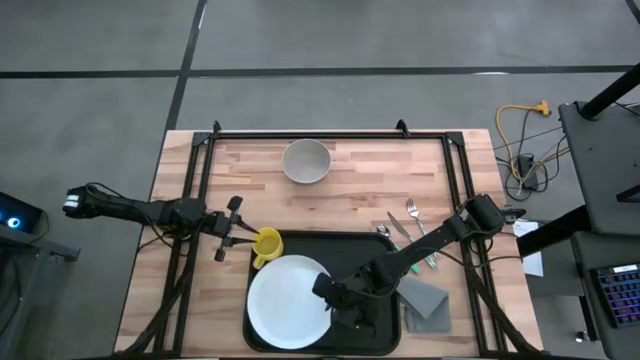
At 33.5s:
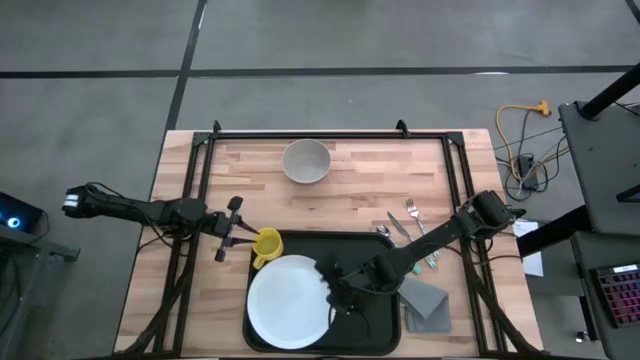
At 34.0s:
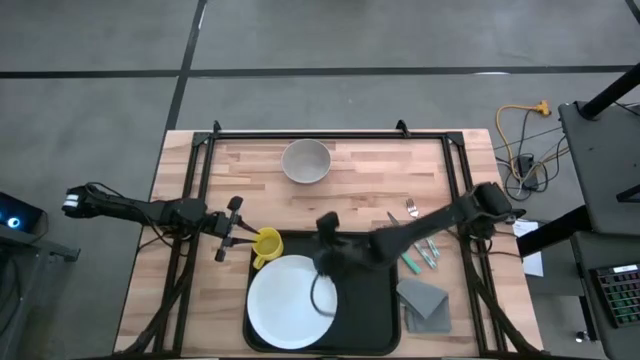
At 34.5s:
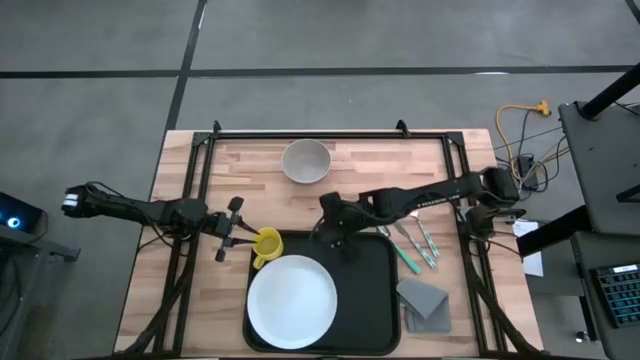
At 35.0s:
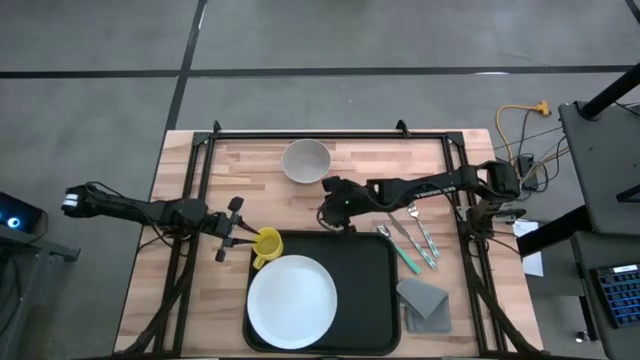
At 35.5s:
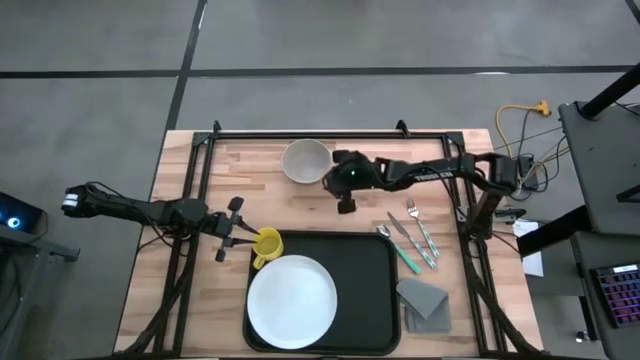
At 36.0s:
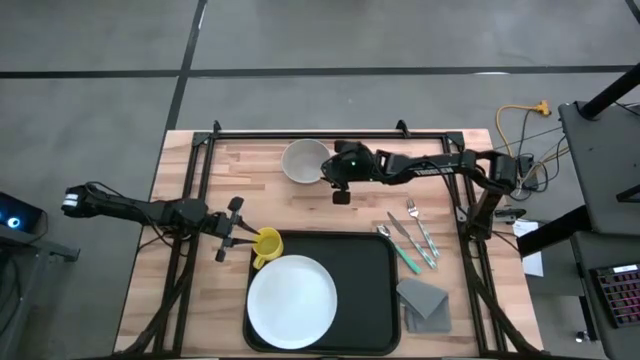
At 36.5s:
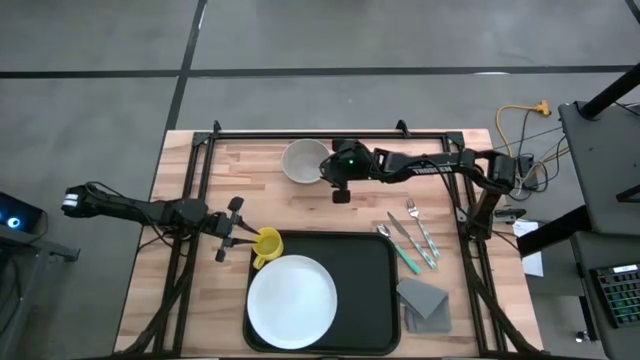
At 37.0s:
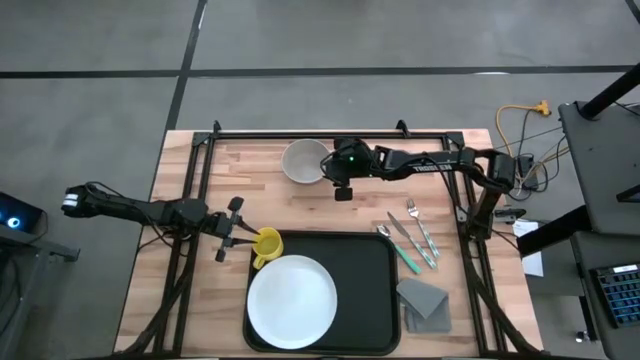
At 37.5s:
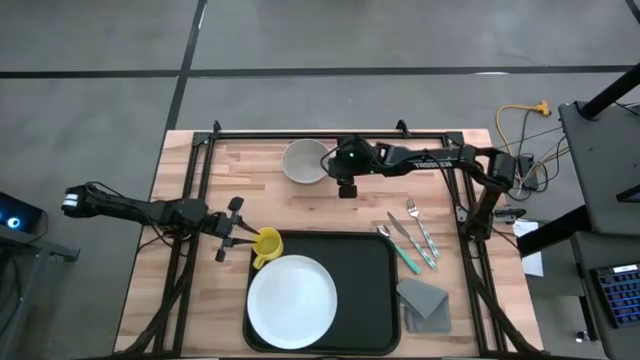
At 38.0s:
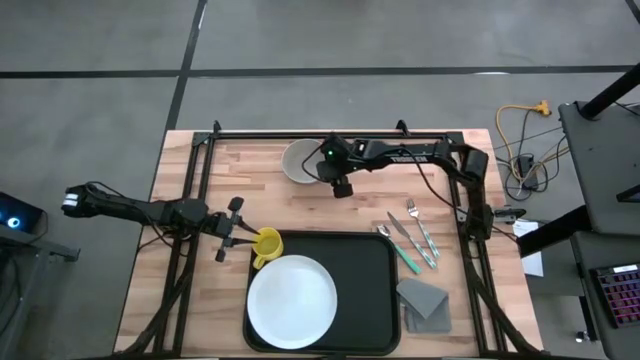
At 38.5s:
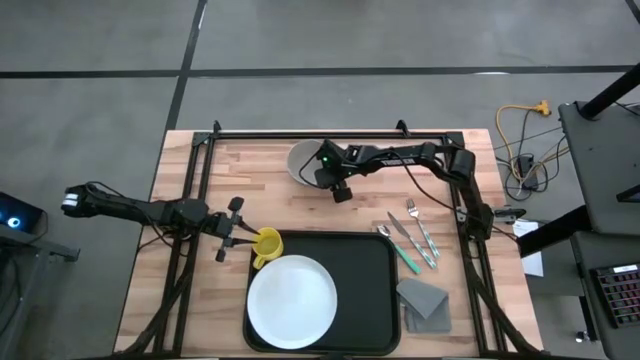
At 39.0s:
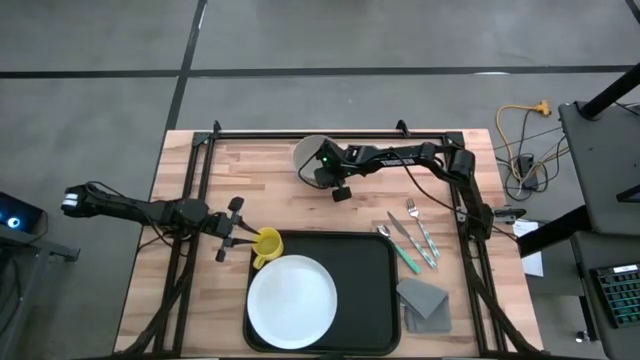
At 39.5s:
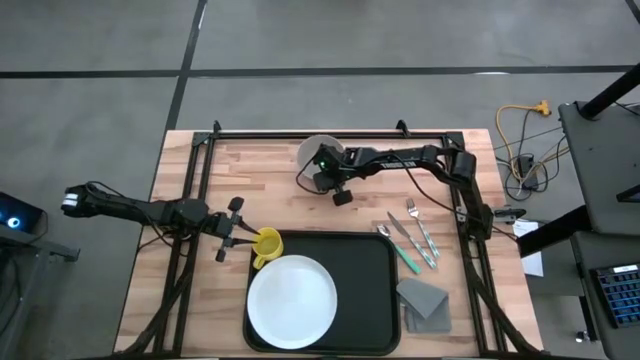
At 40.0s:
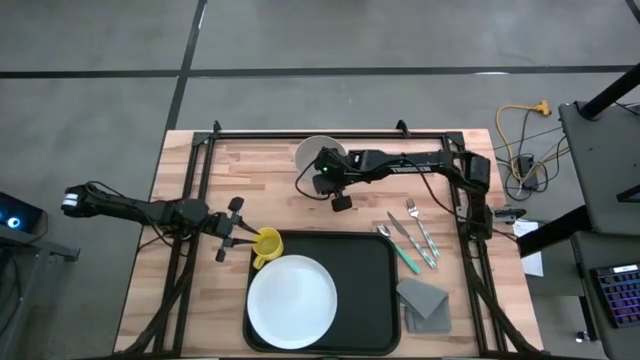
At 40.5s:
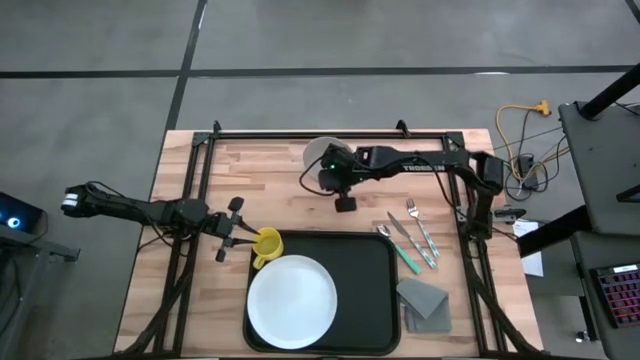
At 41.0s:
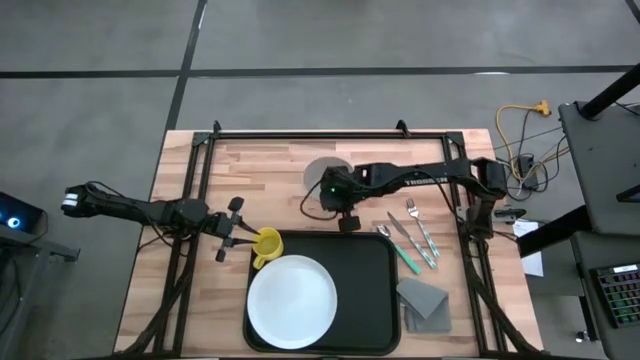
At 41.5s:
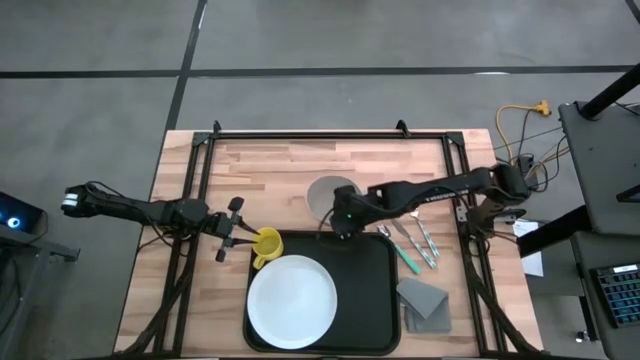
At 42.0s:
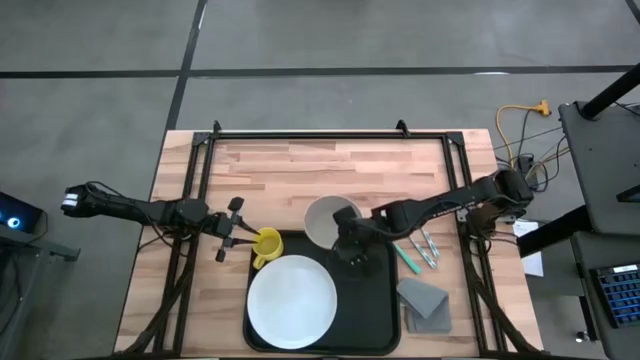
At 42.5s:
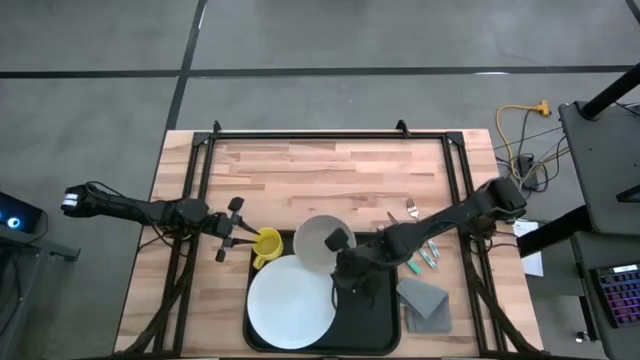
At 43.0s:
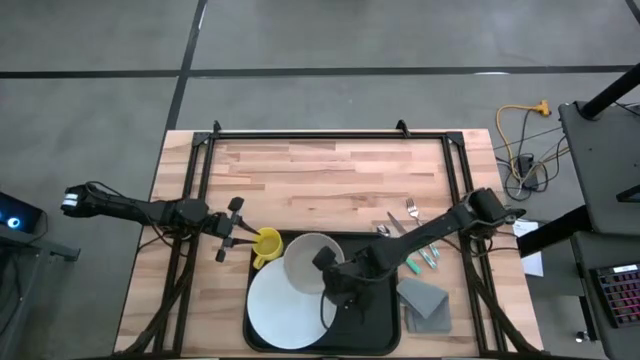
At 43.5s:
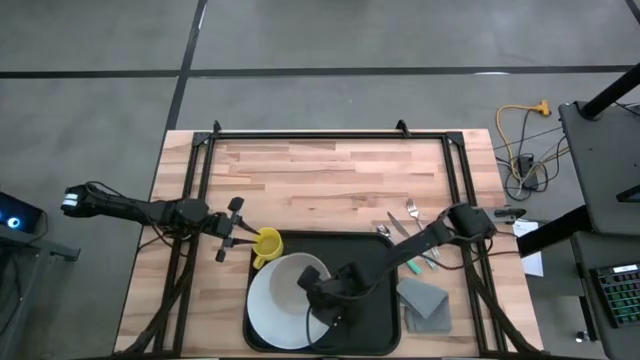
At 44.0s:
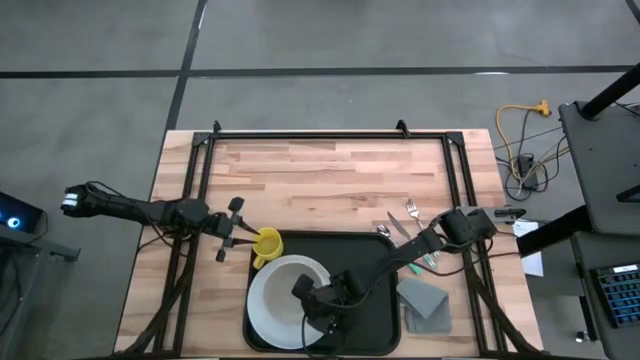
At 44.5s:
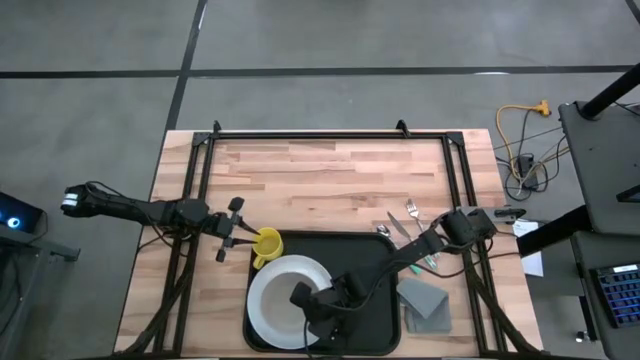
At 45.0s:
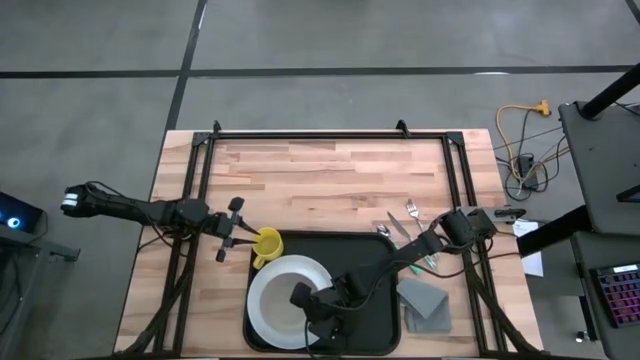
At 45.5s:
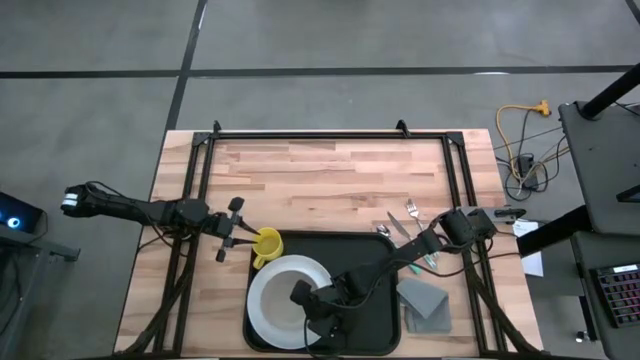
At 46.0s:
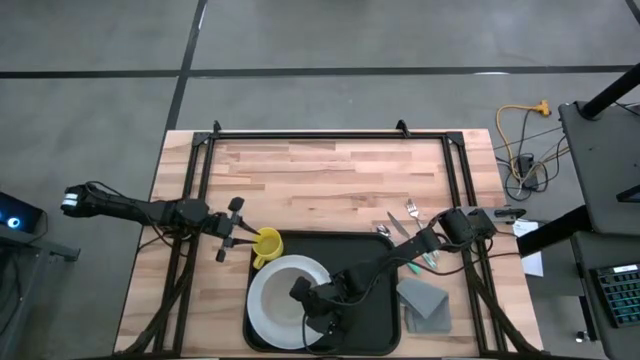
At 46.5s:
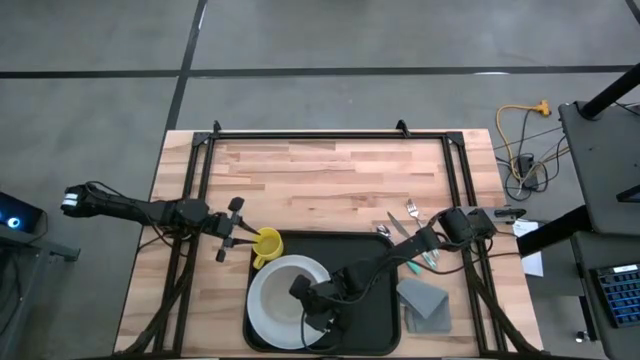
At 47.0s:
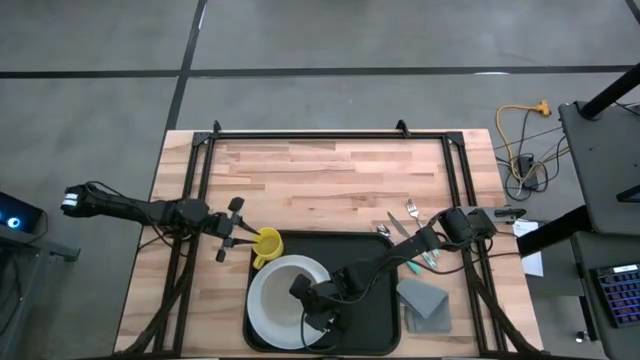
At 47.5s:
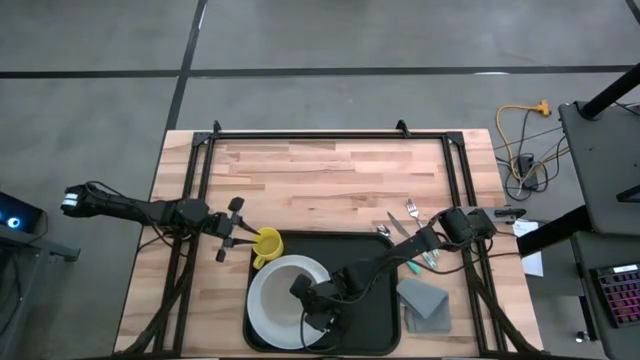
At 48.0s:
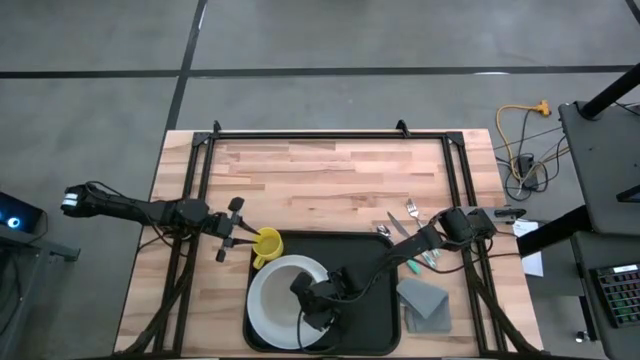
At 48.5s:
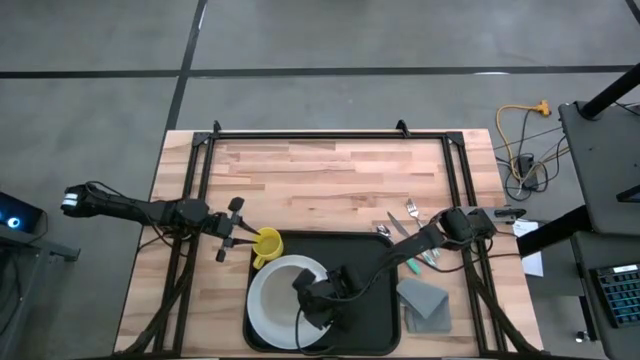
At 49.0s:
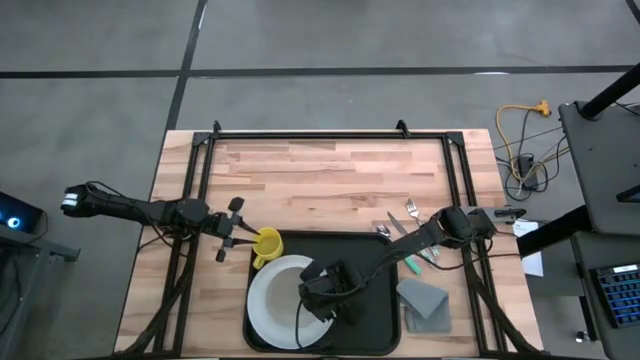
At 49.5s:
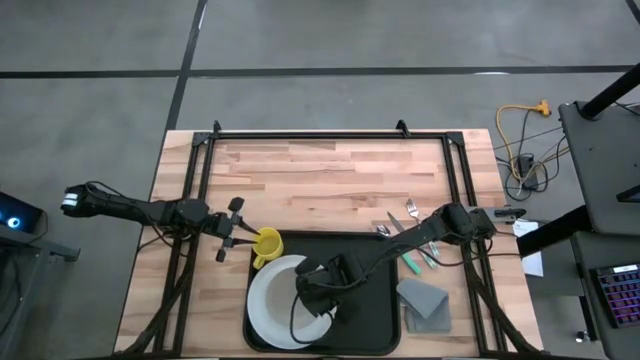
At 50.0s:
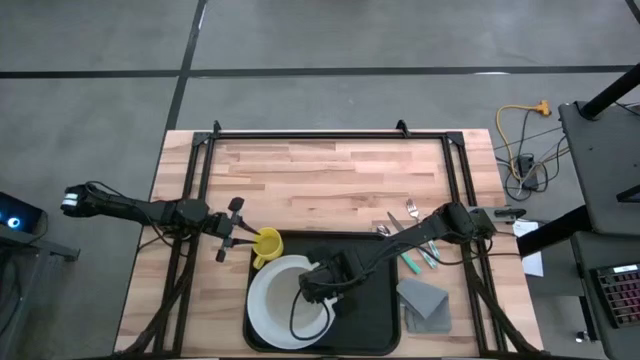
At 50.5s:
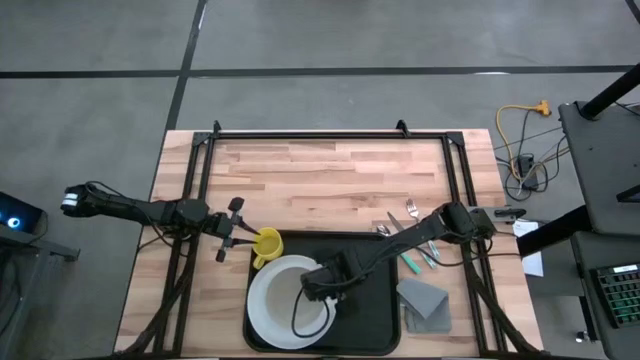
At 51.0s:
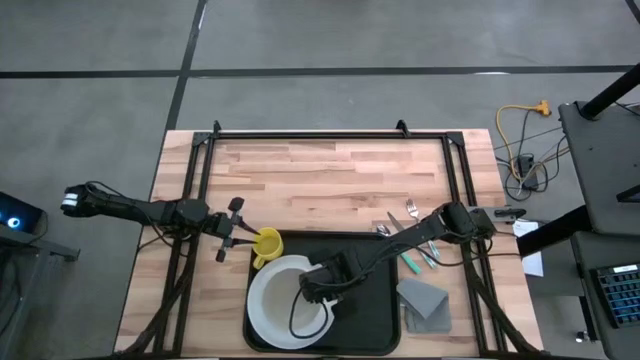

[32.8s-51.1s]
Task: Set up tray
Put the gray bowl on the white plate

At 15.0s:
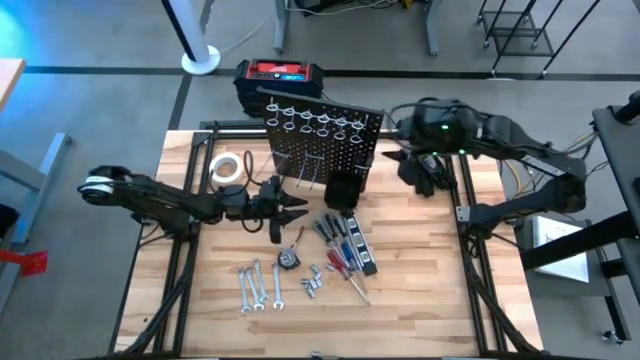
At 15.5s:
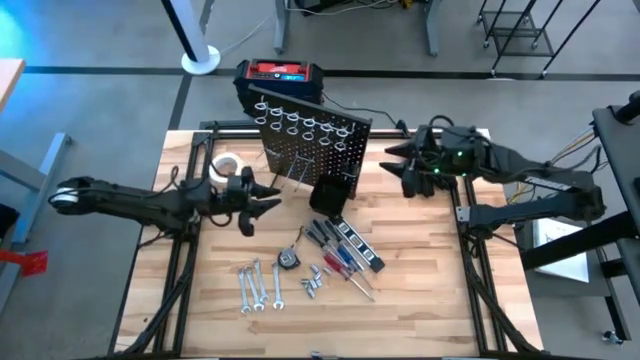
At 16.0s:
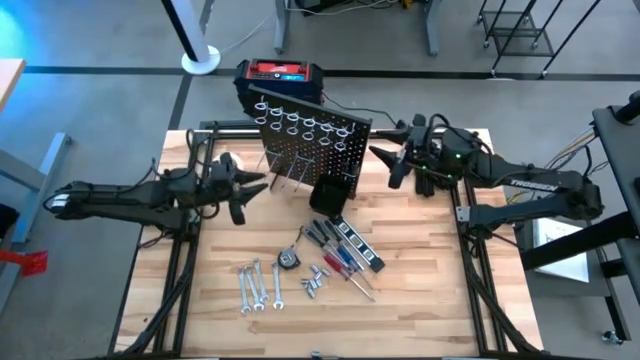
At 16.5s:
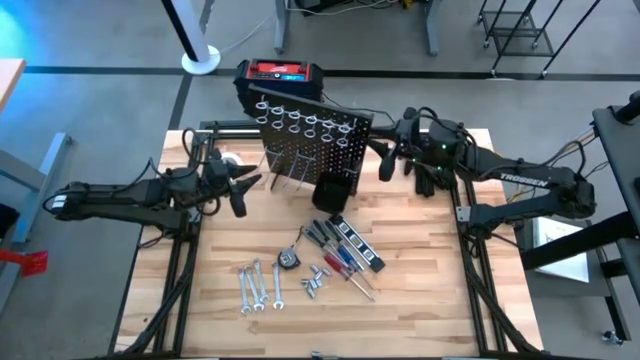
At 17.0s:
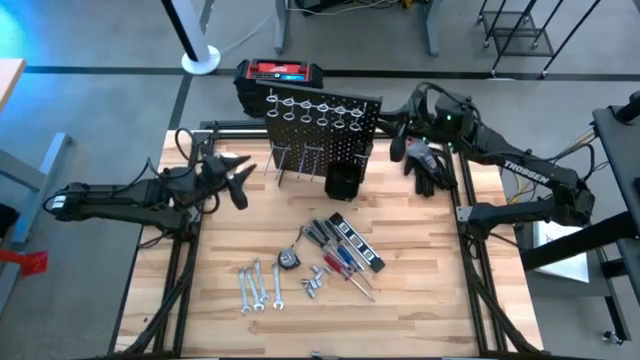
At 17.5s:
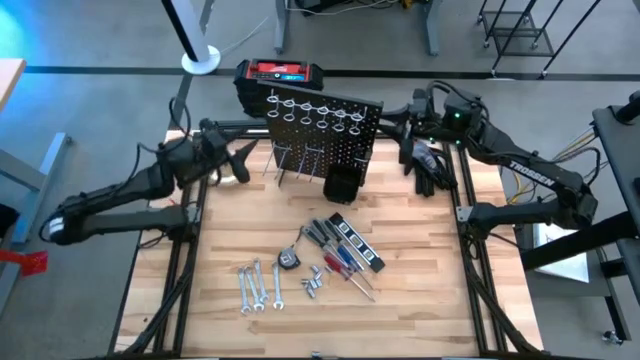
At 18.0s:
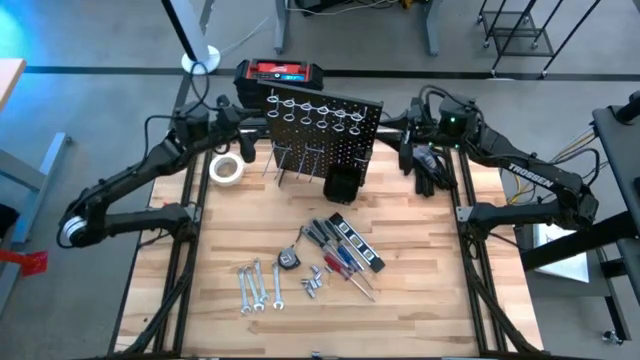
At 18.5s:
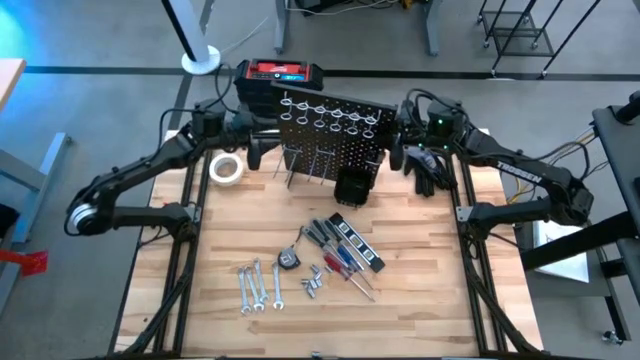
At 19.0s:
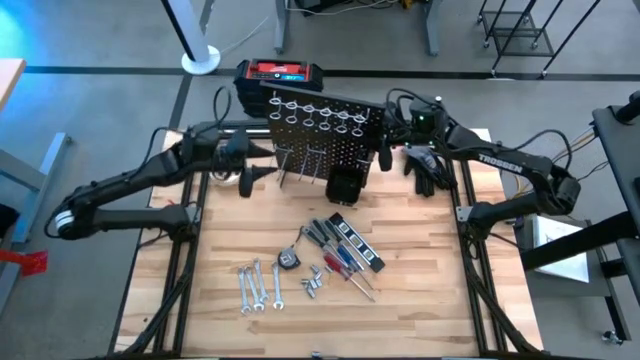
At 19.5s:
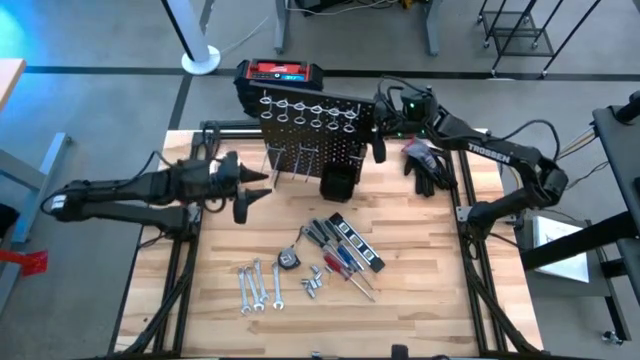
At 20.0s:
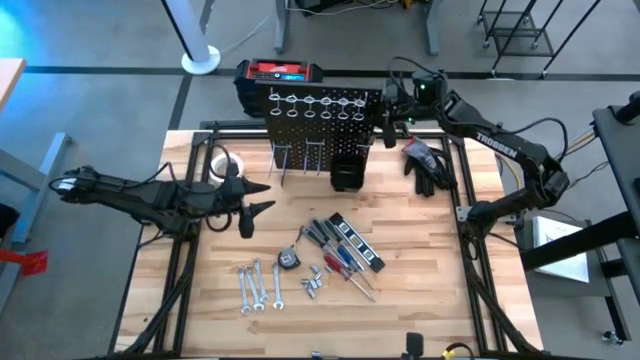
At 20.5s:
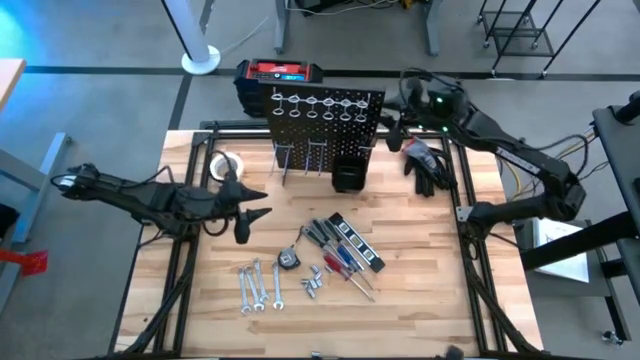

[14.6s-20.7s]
Task: Hang tools onto peg board
Adjust the peg board
